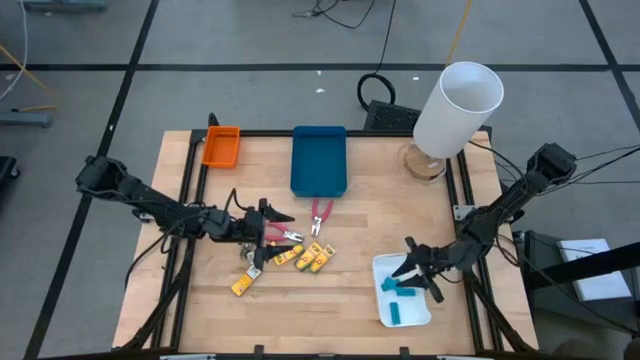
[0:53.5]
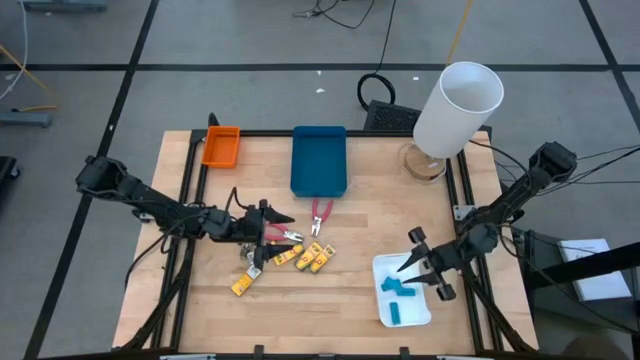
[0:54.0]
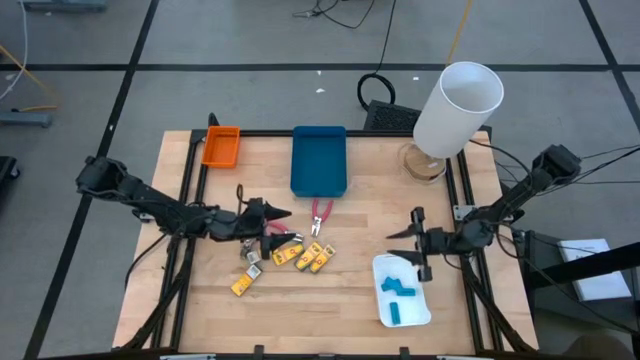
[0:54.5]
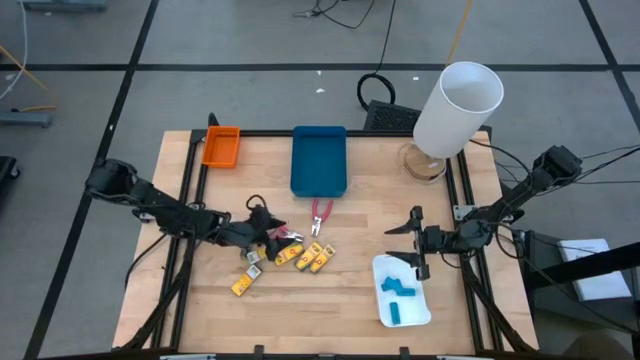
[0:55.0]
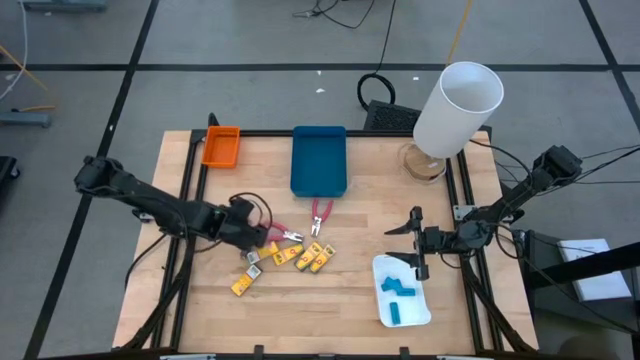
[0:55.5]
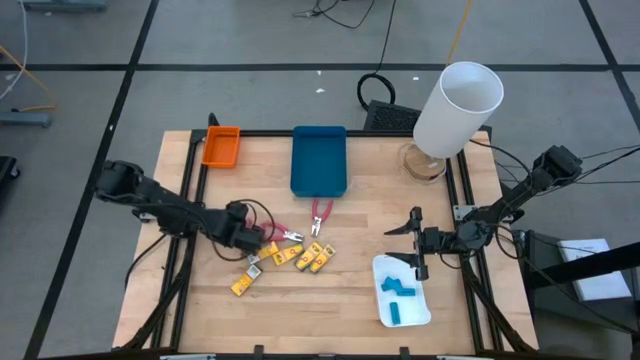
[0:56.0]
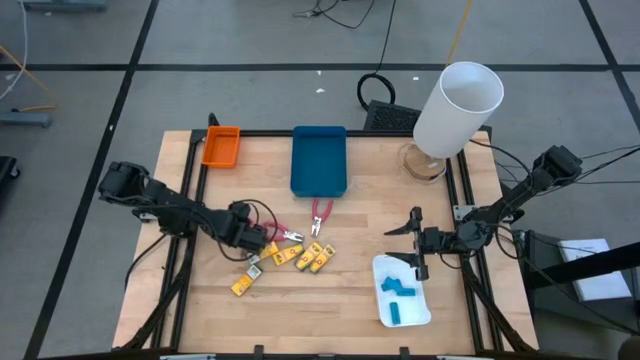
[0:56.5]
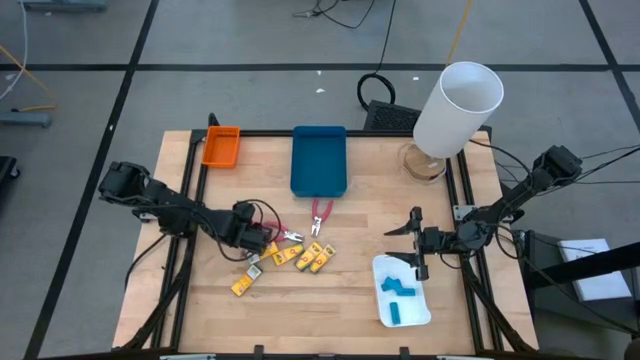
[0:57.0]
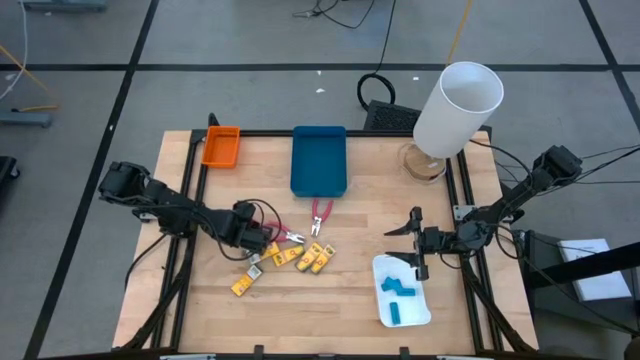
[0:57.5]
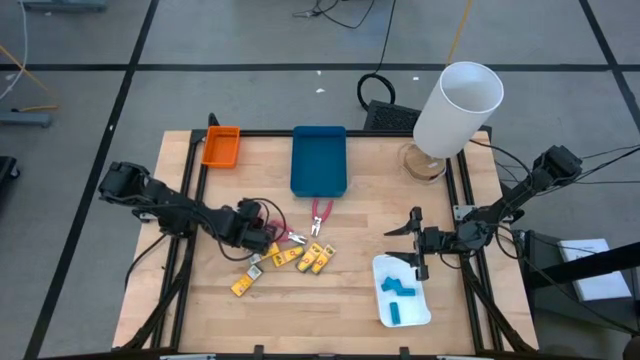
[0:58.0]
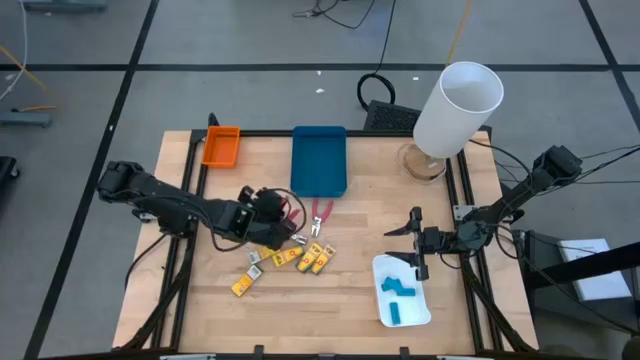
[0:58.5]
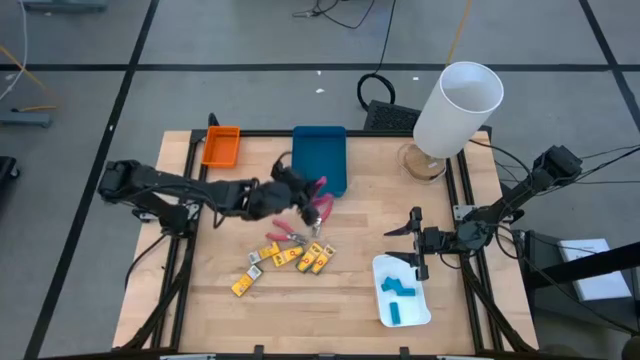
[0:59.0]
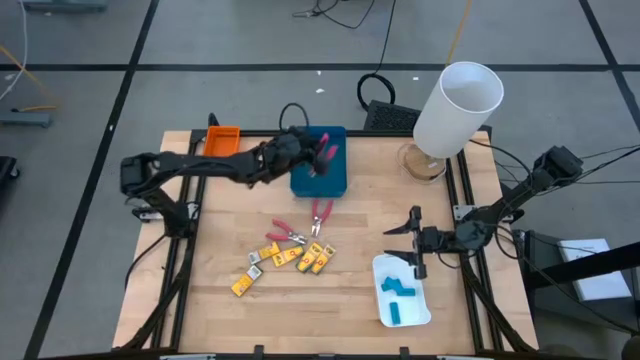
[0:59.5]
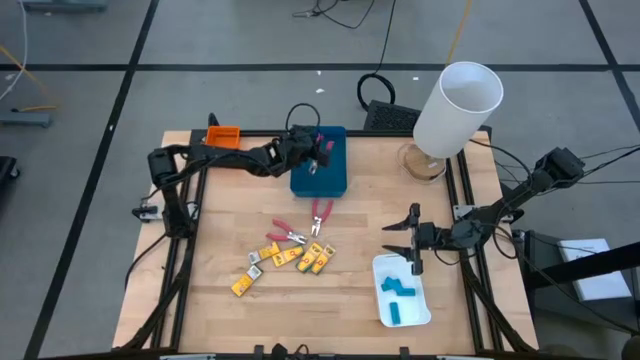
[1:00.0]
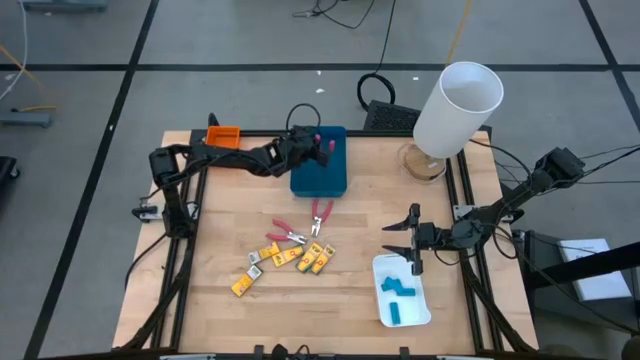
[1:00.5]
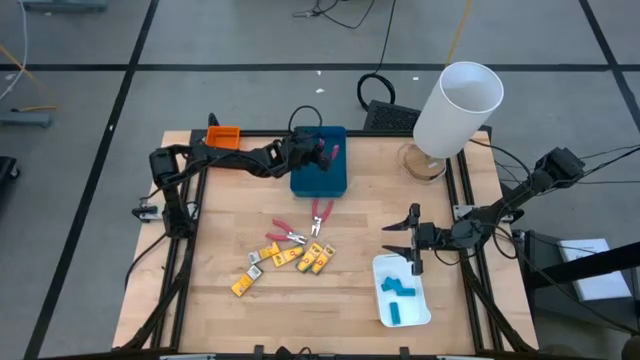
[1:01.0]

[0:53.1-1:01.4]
Task: Pick & Place School Supplies
Put the left pink hole puncher into the blue bin

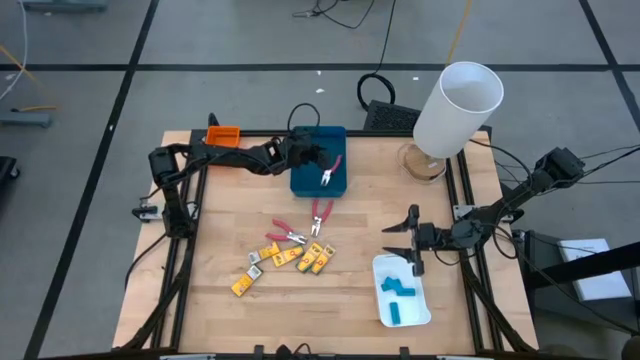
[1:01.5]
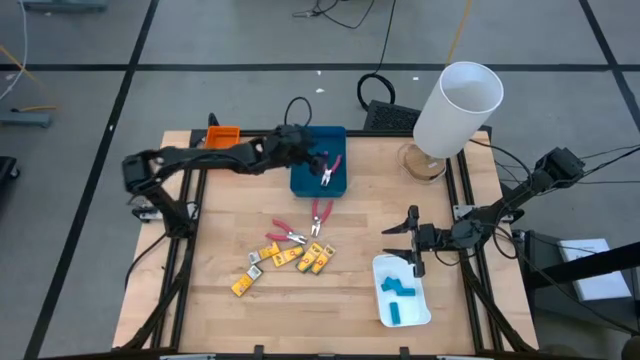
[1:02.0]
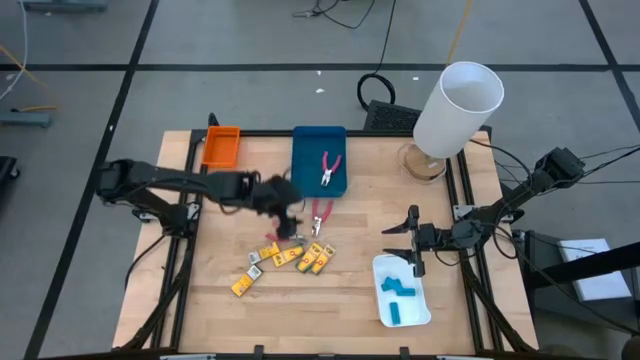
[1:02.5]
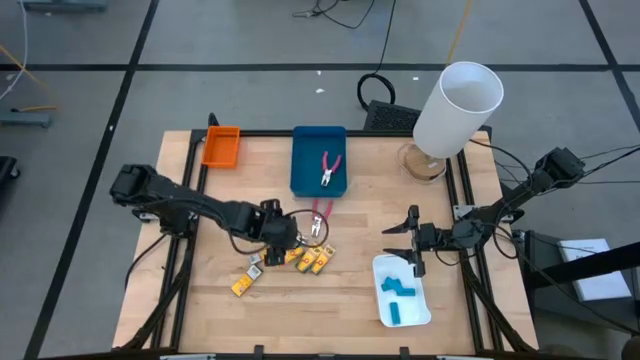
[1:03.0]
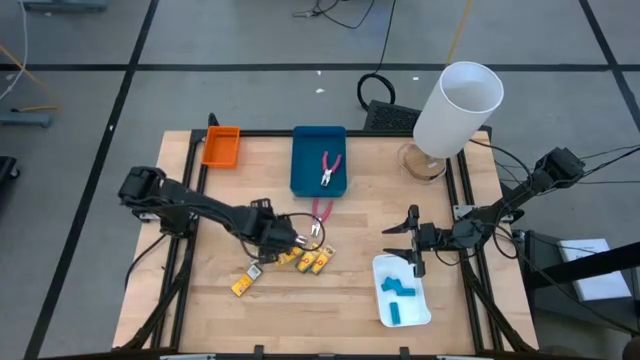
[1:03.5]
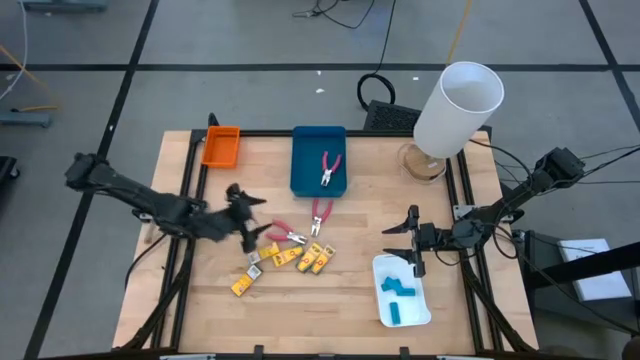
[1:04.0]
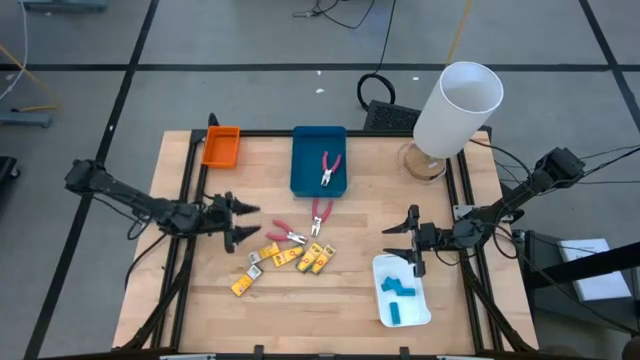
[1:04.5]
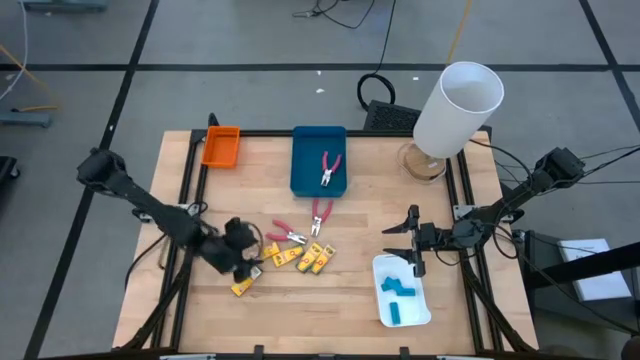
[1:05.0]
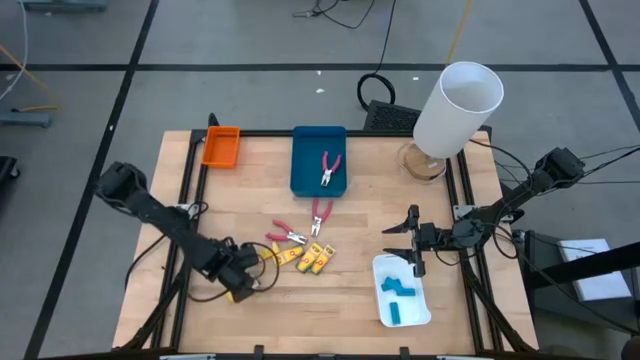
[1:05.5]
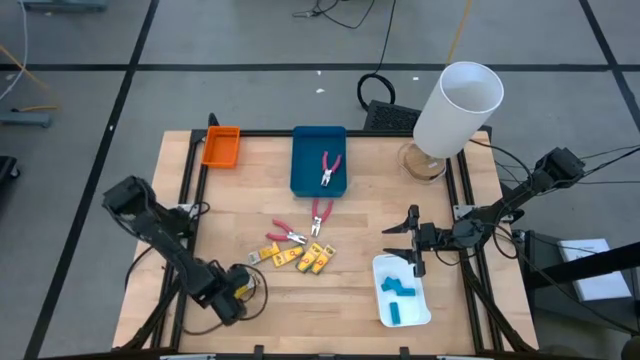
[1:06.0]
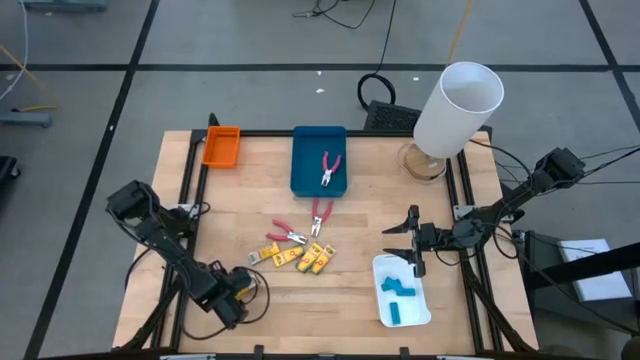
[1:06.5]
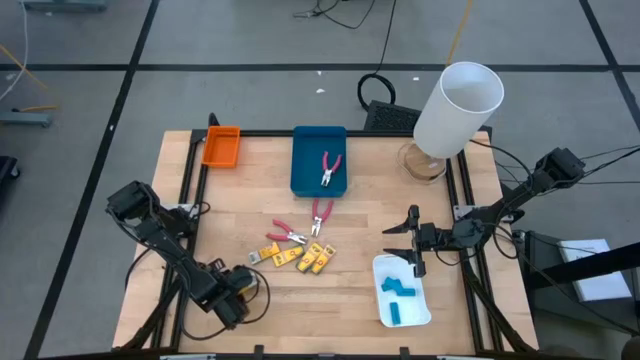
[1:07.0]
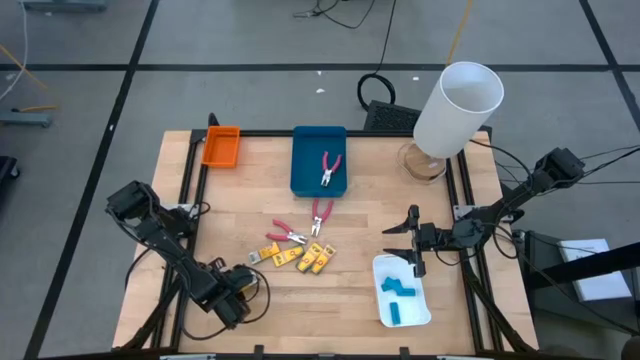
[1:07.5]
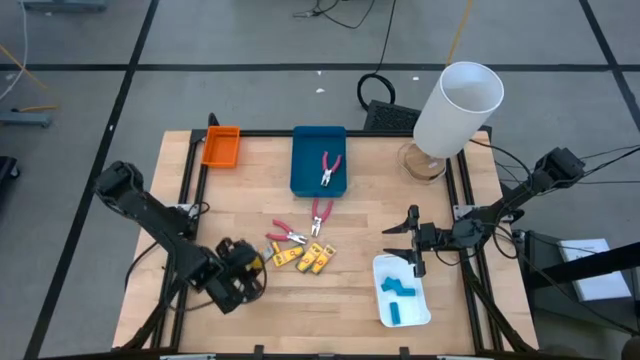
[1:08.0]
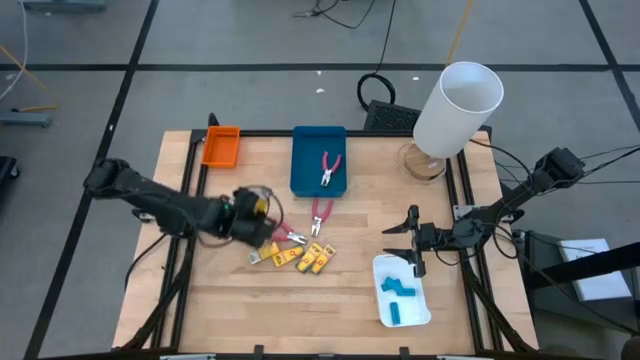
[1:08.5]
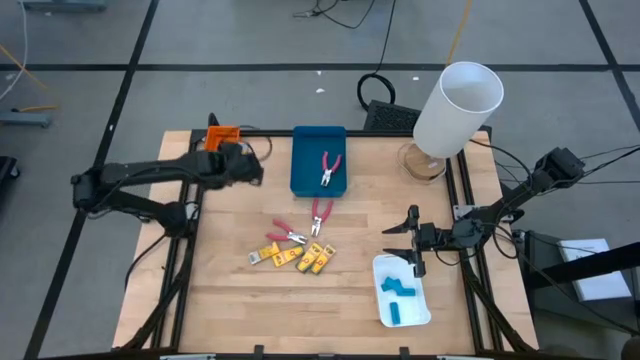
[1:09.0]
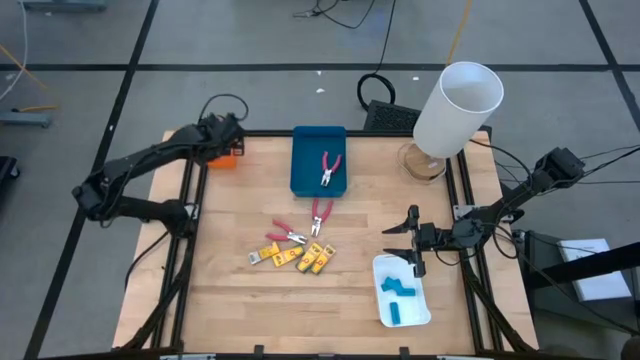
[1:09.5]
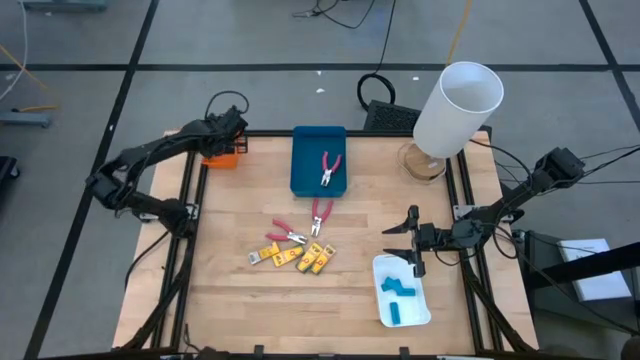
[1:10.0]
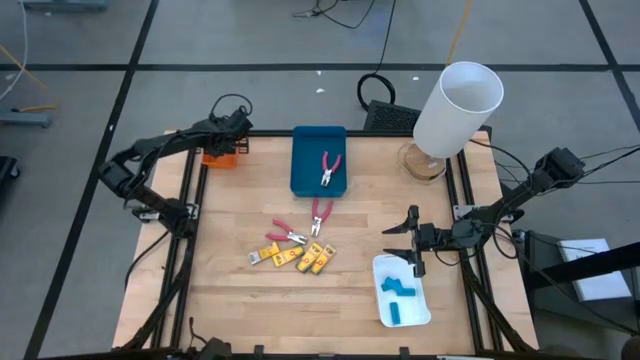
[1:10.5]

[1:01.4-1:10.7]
Put the yellow crayon pack into the orange bin

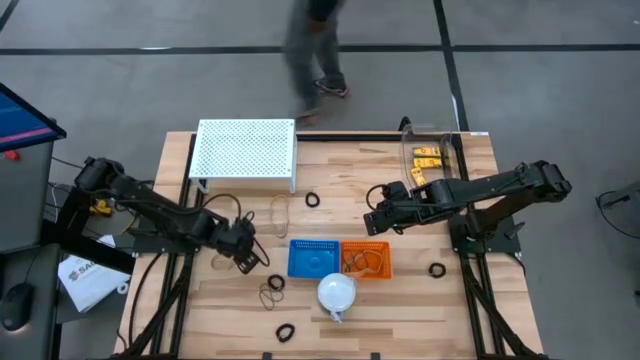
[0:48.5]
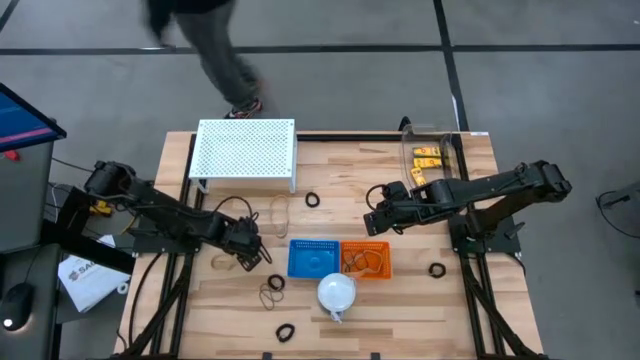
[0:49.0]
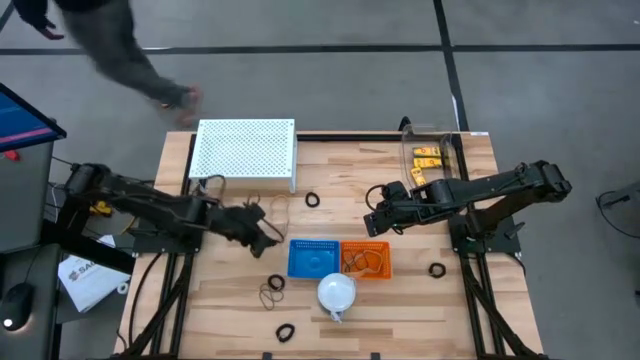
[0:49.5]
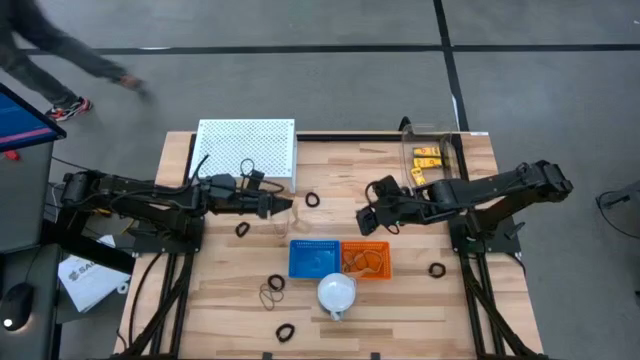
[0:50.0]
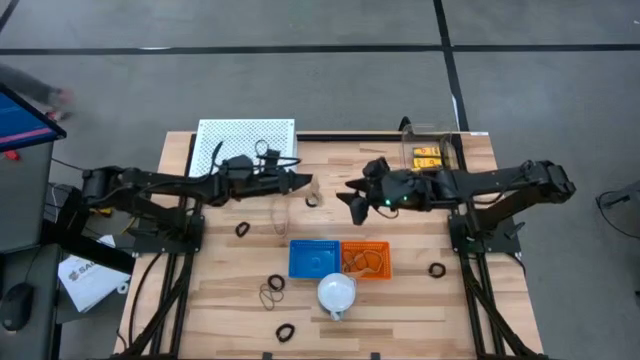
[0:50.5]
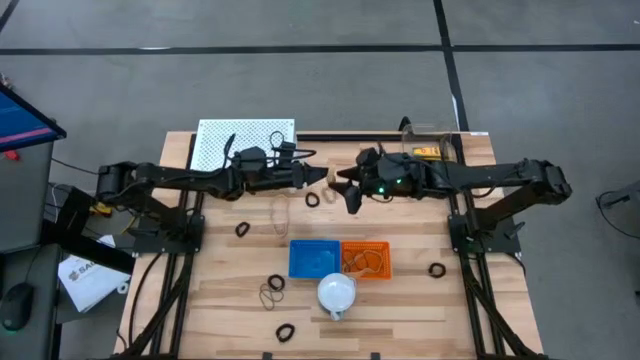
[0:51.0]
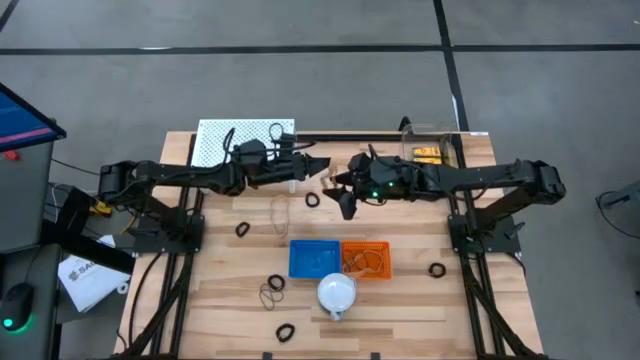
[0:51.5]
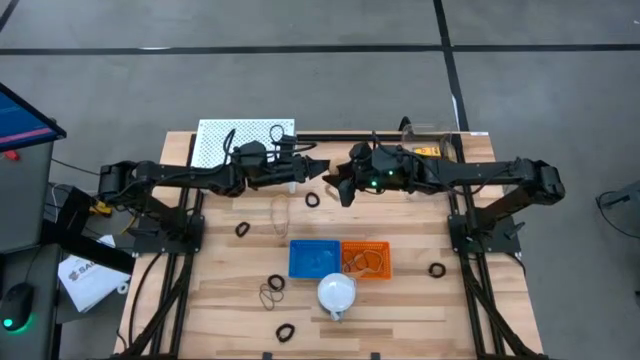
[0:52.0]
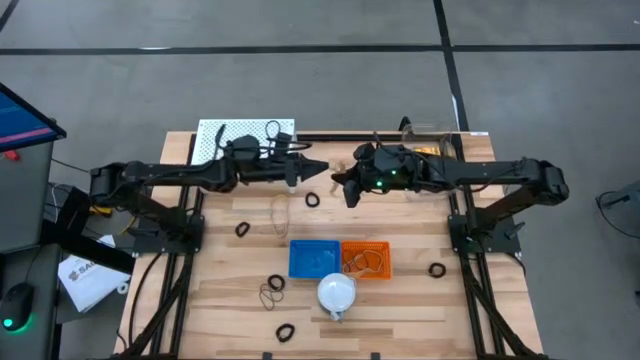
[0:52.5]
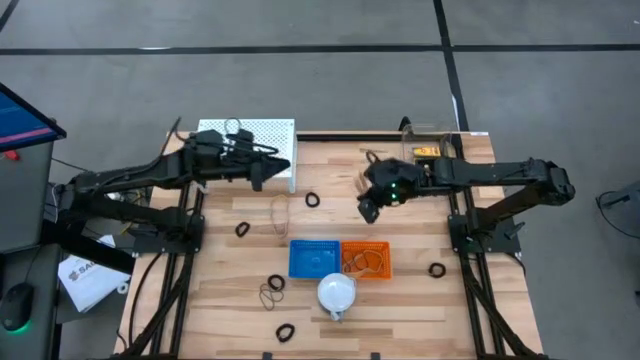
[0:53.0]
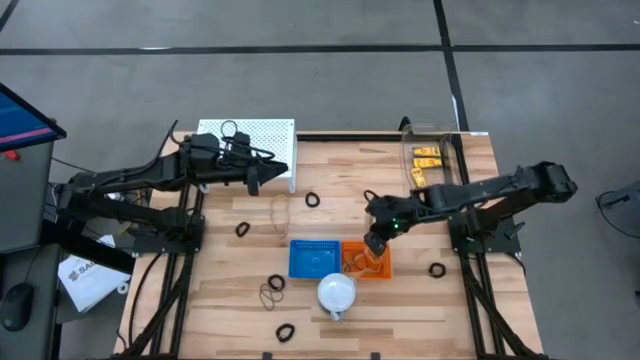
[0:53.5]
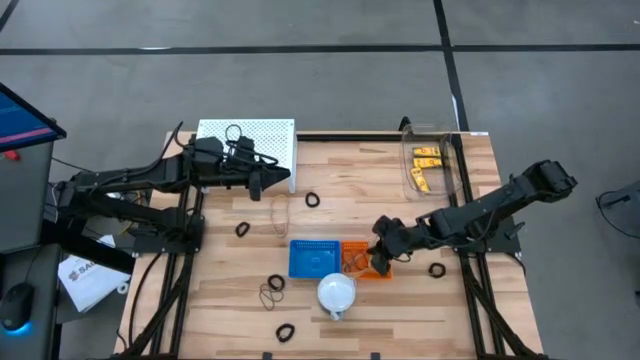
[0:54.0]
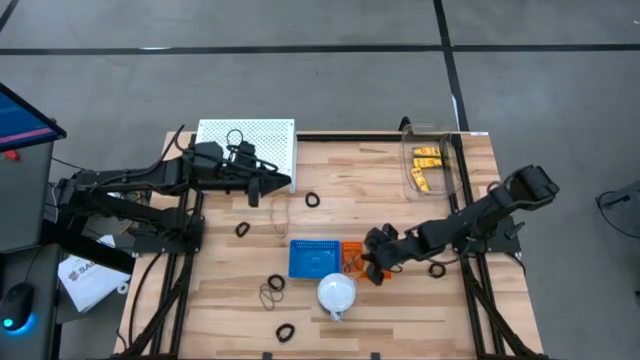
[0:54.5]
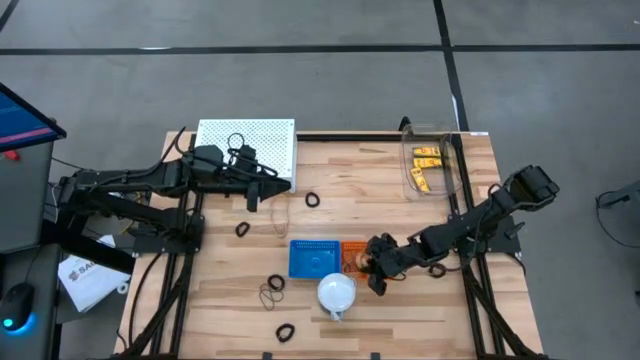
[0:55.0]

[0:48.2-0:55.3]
Task: Pick & Place Office Desk Supplies
Put the bottom brown rubber band into the orange basket
